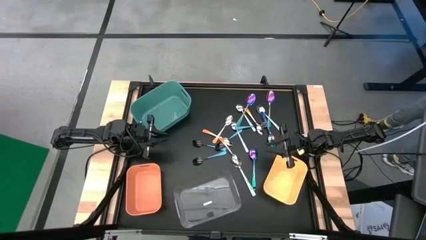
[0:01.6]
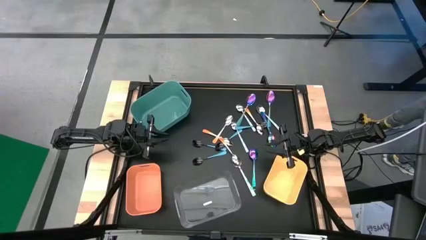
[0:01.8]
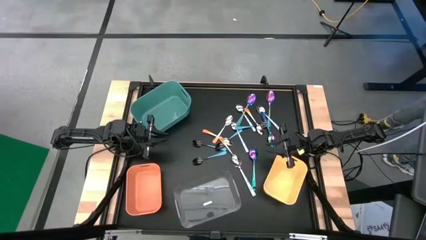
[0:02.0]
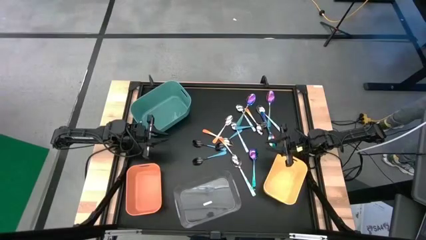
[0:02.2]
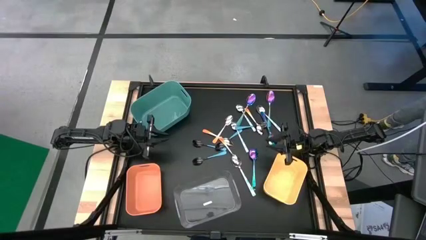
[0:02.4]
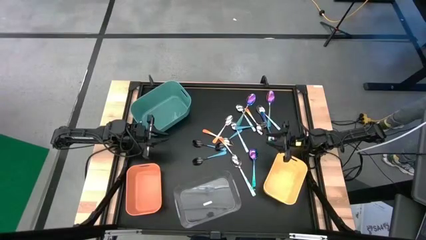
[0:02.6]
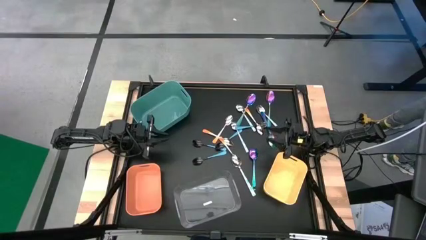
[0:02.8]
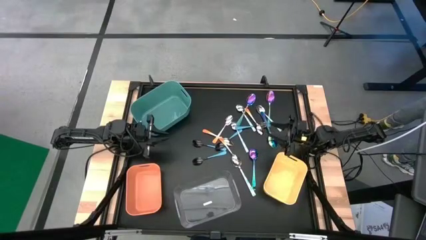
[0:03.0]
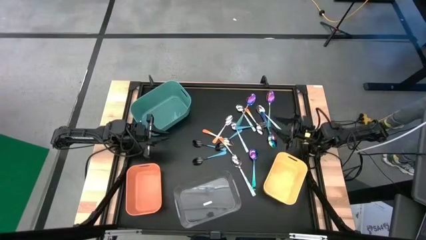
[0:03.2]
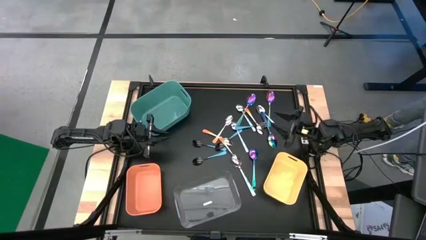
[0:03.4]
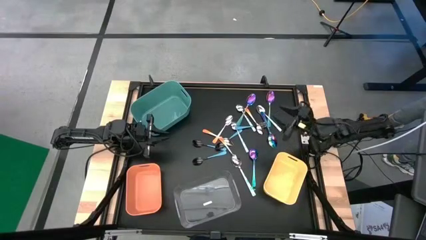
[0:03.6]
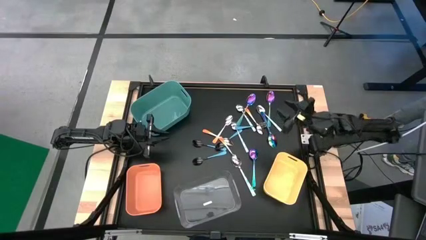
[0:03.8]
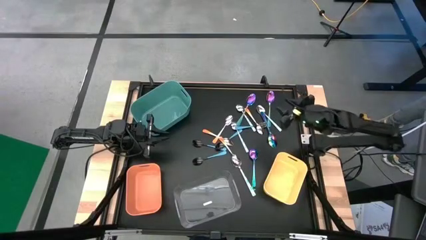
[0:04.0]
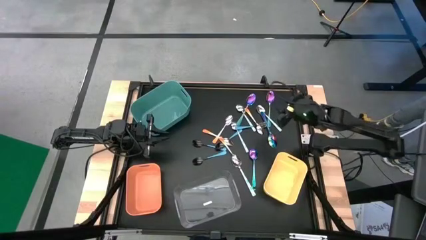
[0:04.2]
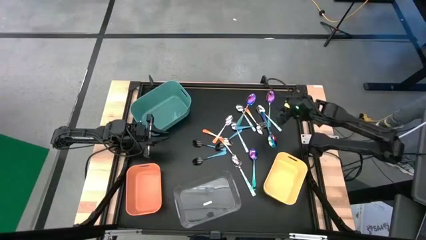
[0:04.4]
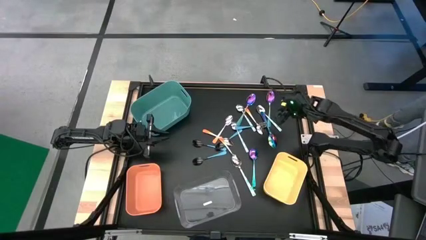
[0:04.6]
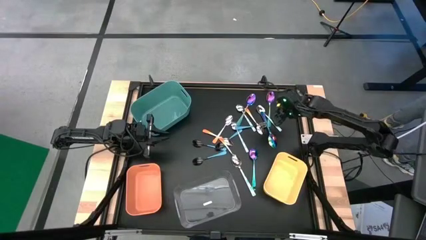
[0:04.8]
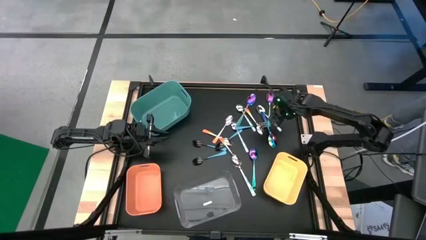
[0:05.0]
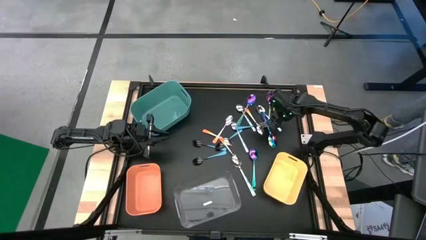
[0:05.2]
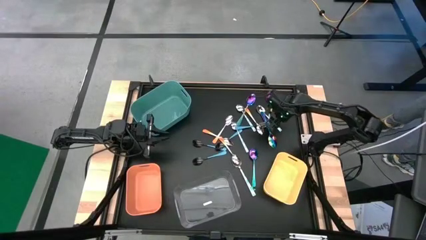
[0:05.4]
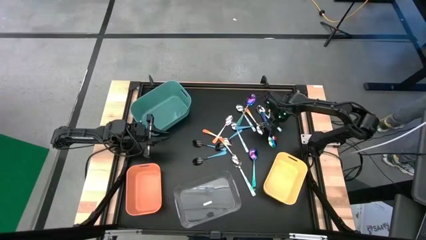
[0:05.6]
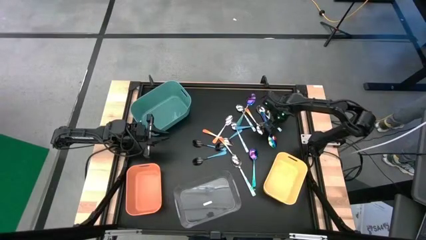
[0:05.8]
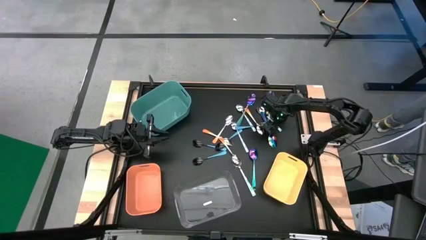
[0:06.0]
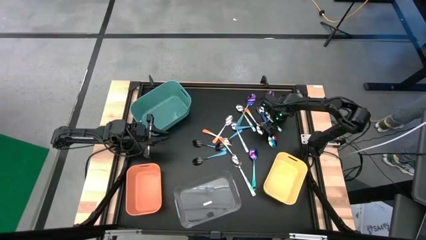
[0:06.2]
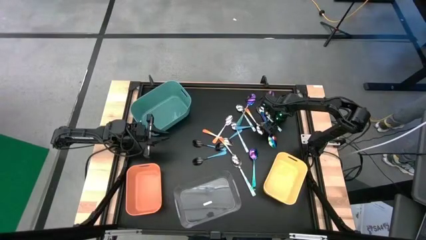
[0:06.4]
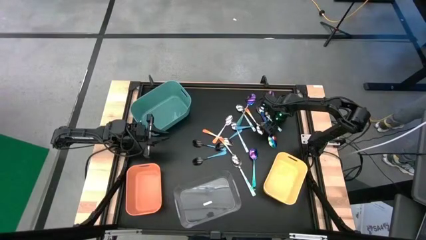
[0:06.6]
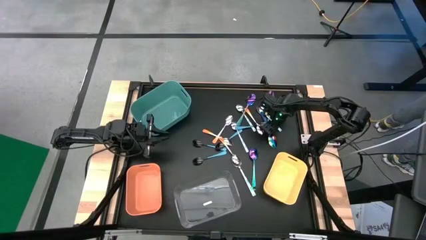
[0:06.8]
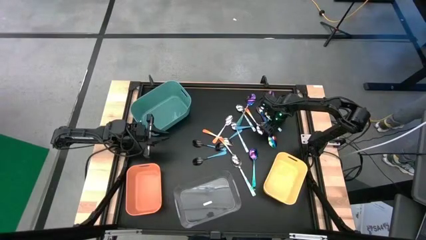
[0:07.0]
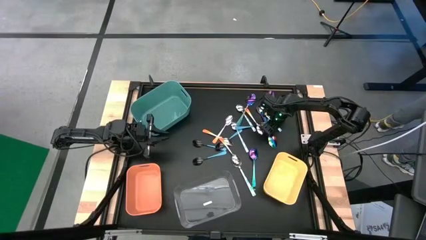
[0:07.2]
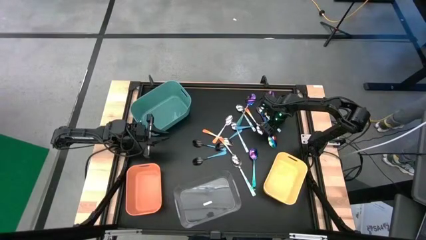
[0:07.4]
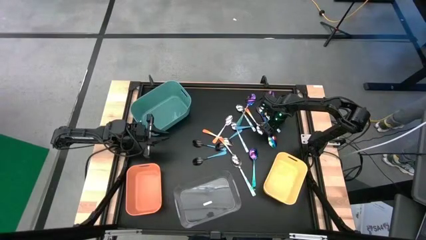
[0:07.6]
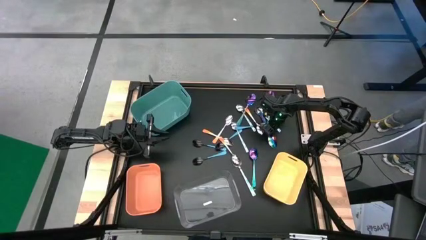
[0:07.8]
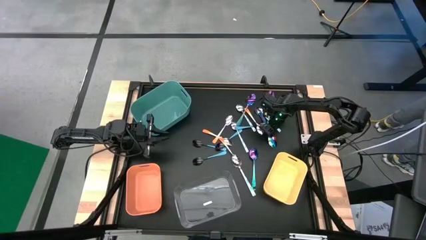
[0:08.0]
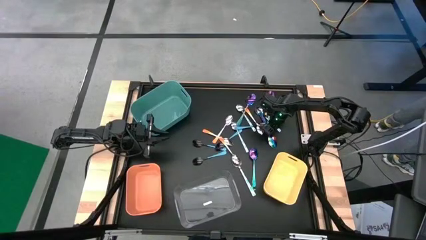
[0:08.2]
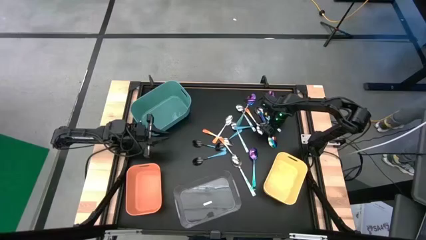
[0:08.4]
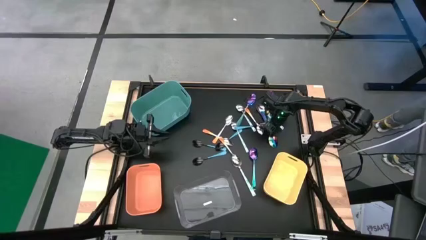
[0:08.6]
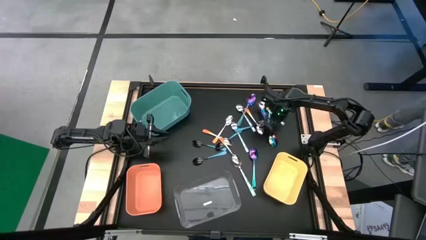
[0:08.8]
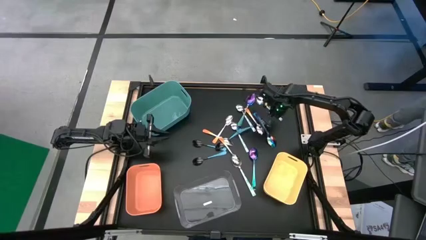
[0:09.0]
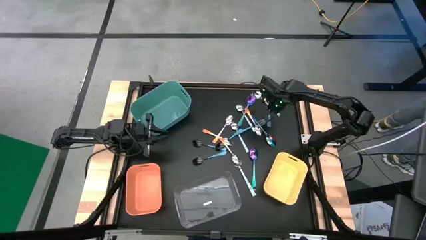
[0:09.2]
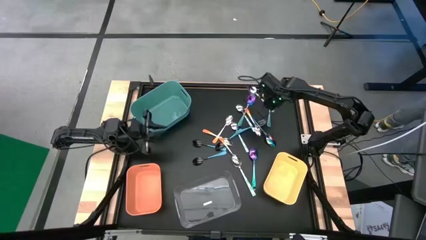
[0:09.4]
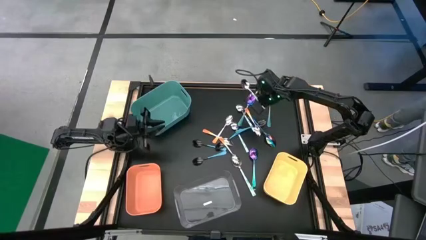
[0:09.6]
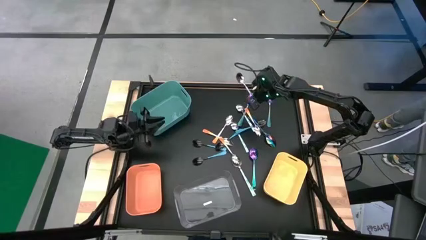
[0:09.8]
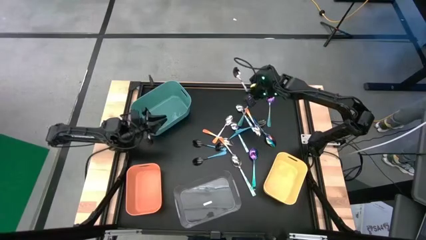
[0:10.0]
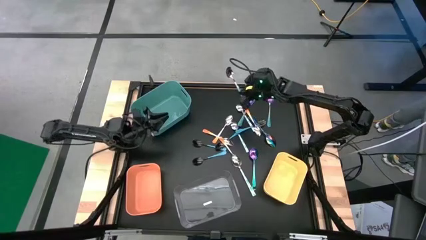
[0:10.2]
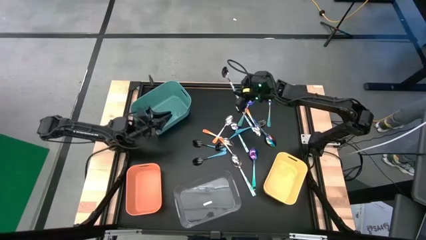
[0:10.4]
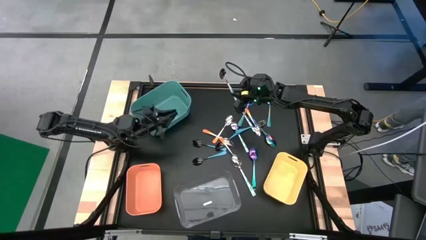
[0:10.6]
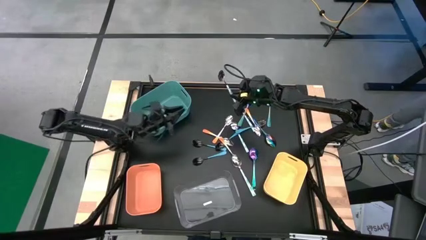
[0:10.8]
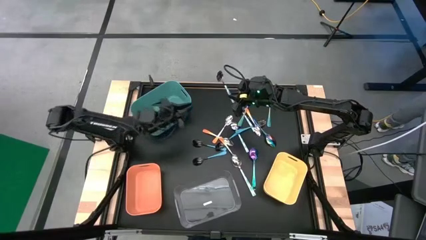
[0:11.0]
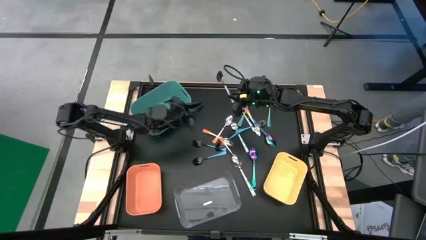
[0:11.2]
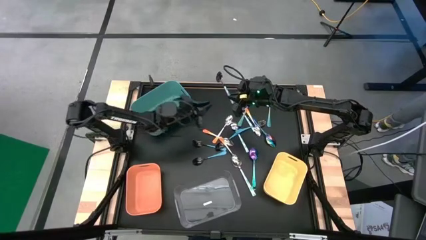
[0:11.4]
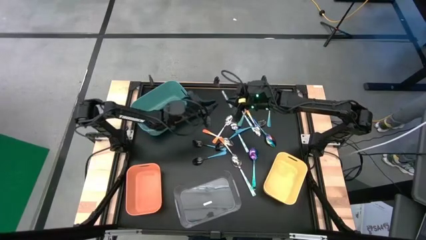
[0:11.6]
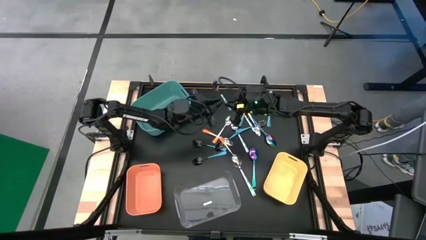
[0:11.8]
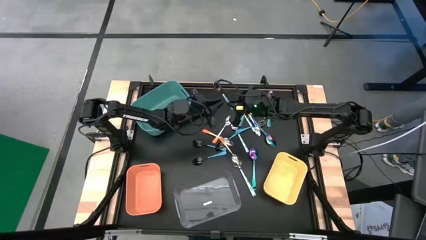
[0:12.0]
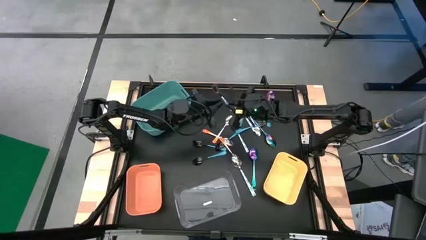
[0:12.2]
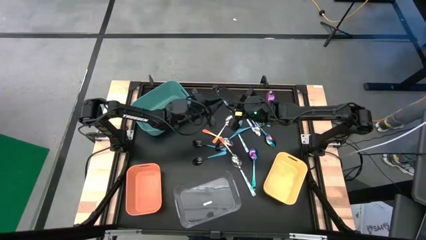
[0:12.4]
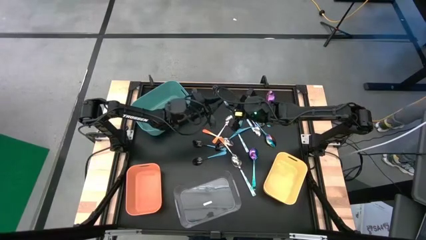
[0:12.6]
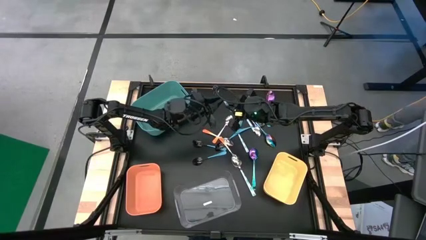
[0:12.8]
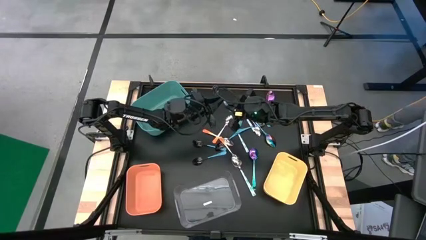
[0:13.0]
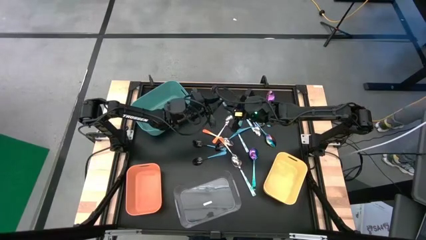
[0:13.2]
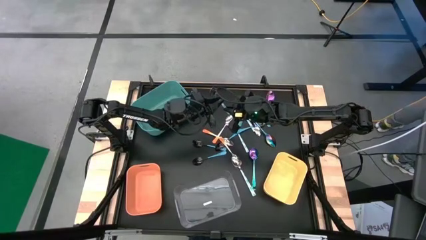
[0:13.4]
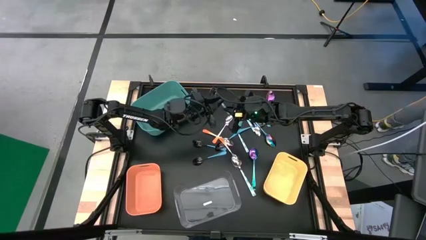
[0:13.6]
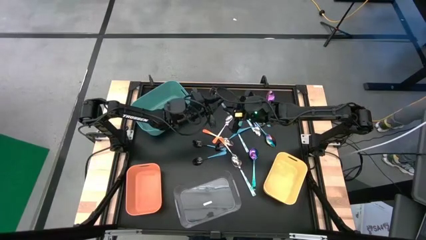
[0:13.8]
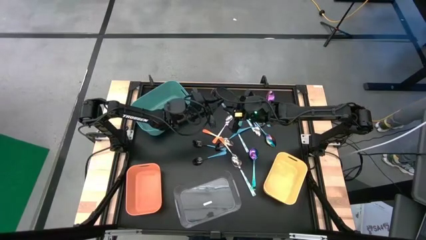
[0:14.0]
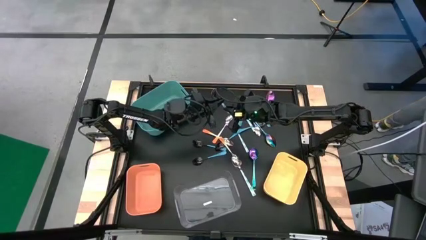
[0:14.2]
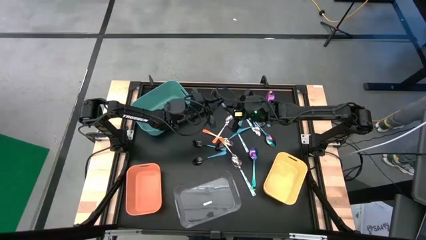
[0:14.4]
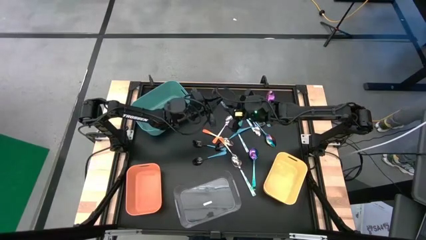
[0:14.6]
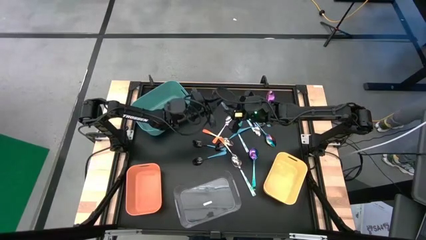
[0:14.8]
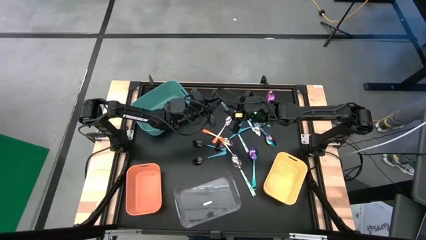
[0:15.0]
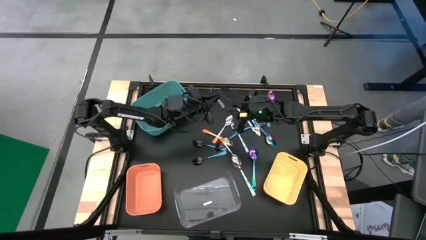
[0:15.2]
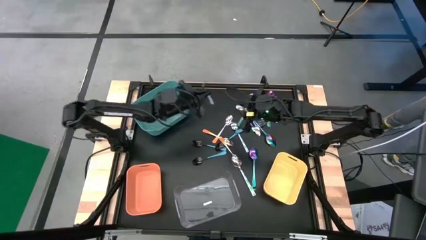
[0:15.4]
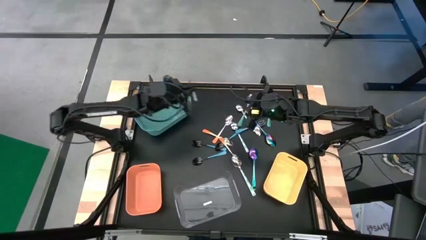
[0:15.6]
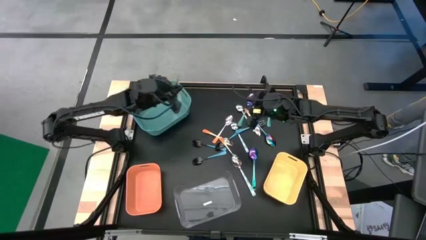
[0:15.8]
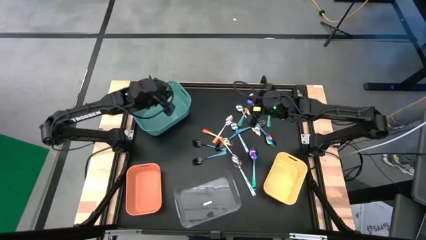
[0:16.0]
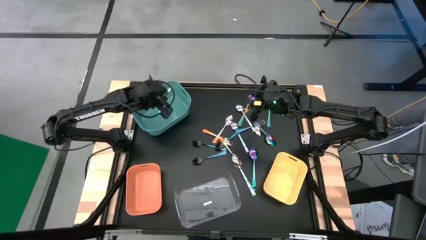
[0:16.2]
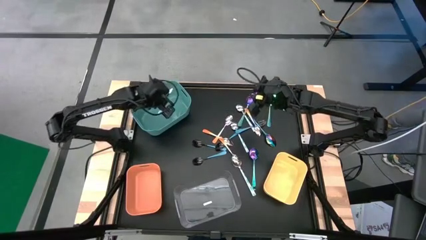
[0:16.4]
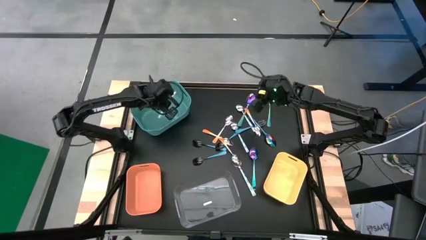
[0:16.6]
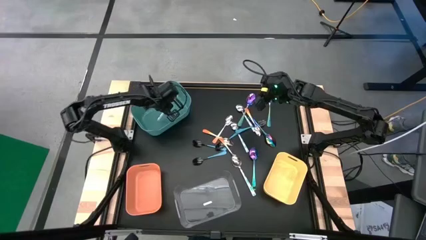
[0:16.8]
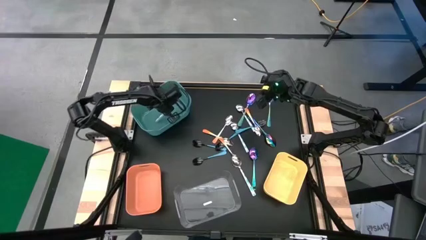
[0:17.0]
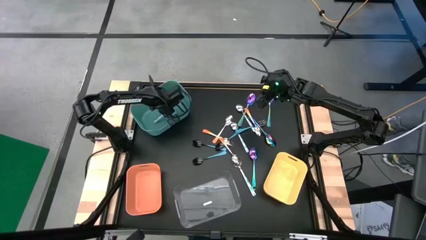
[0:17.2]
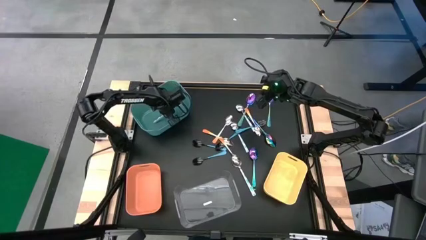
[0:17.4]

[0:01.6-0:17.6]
Task: Sort silverware by color (type)
Put the white-green spoon into the blue bin
